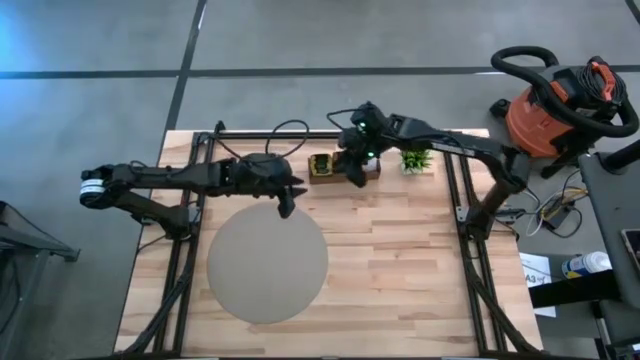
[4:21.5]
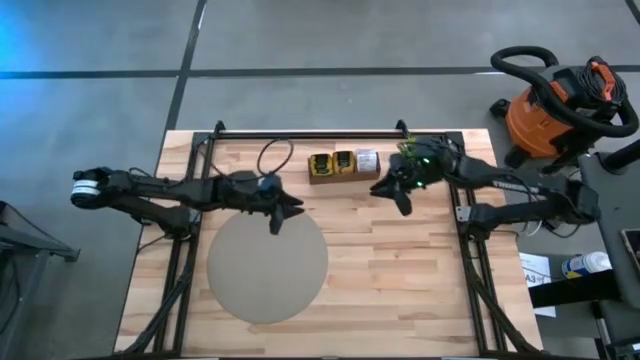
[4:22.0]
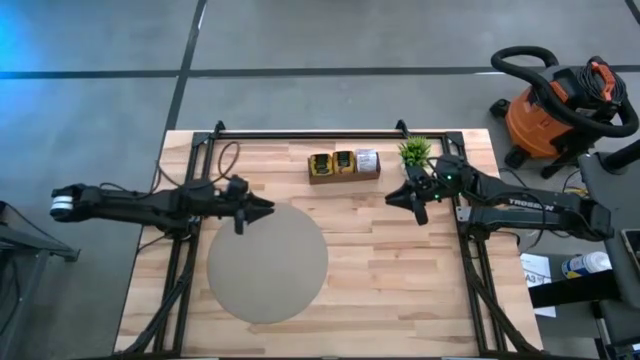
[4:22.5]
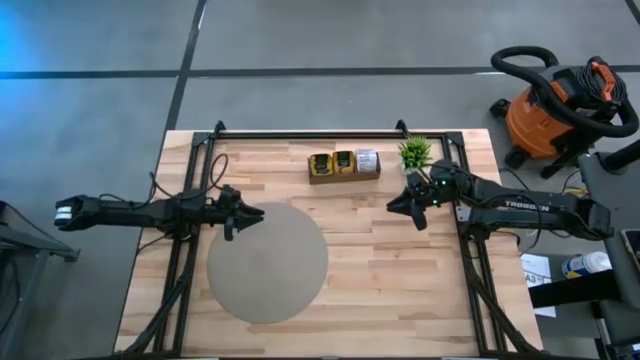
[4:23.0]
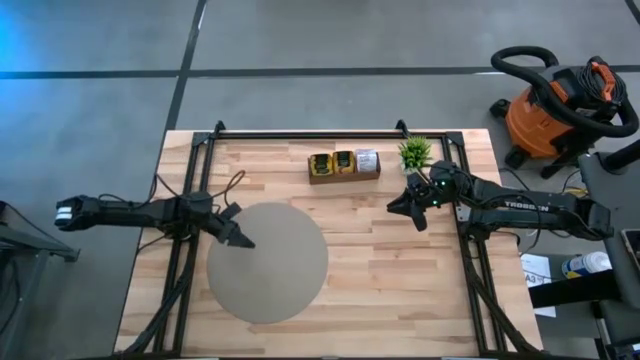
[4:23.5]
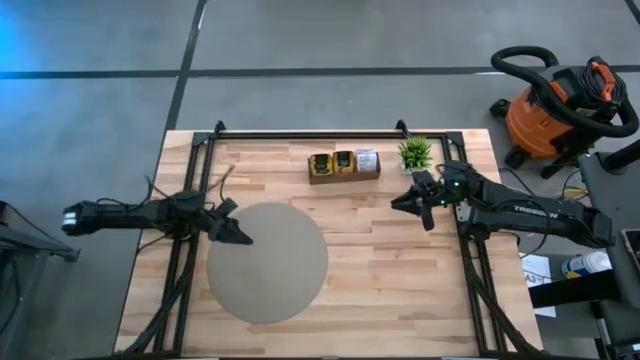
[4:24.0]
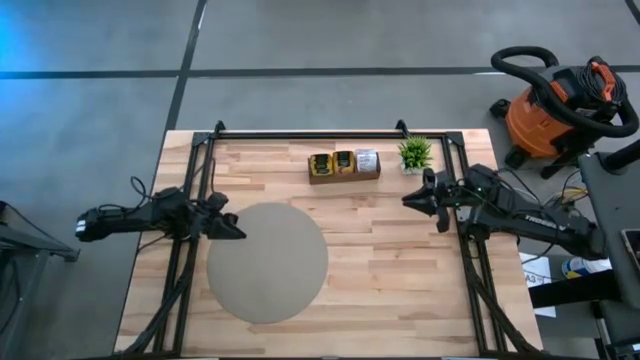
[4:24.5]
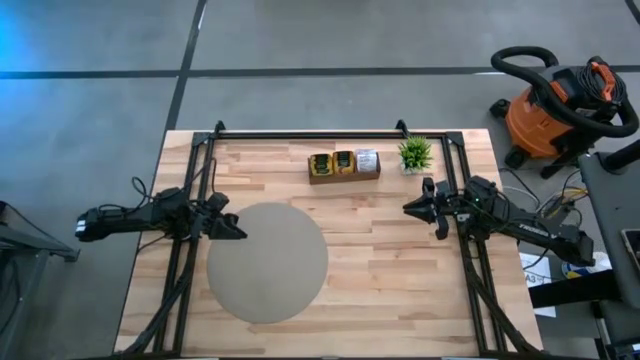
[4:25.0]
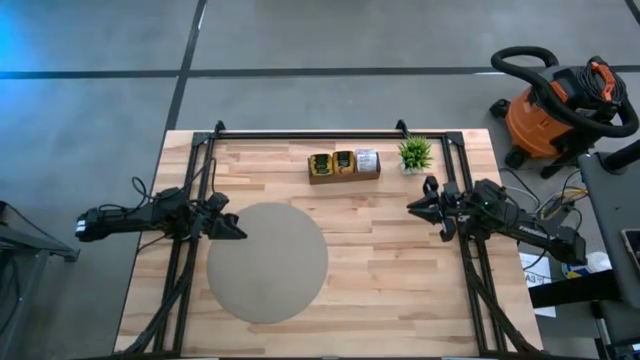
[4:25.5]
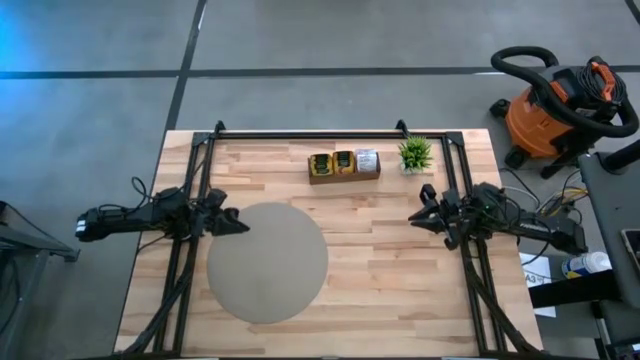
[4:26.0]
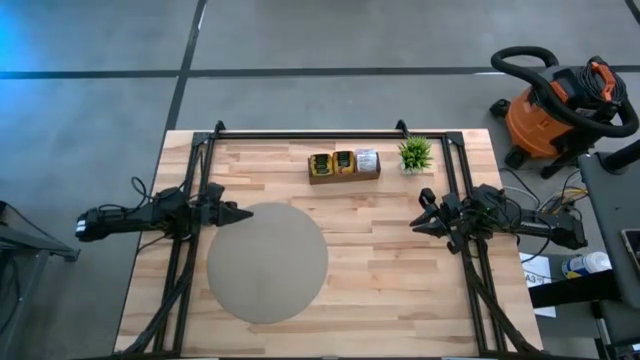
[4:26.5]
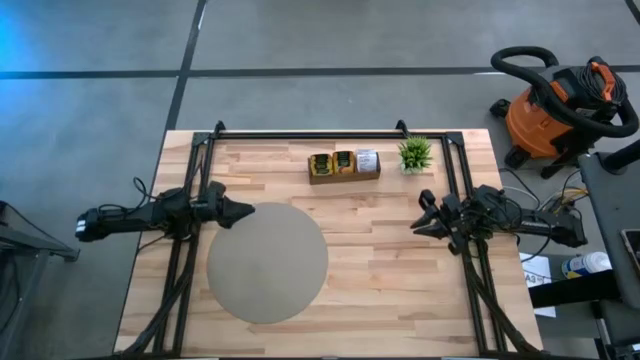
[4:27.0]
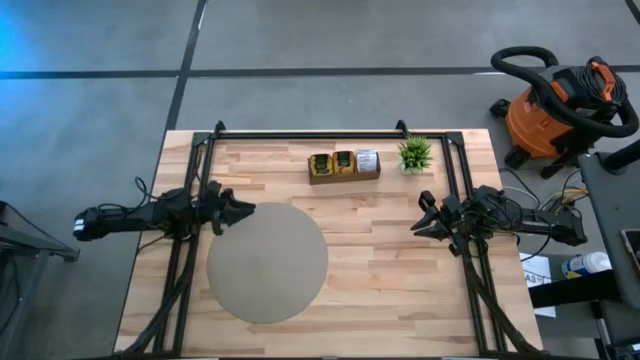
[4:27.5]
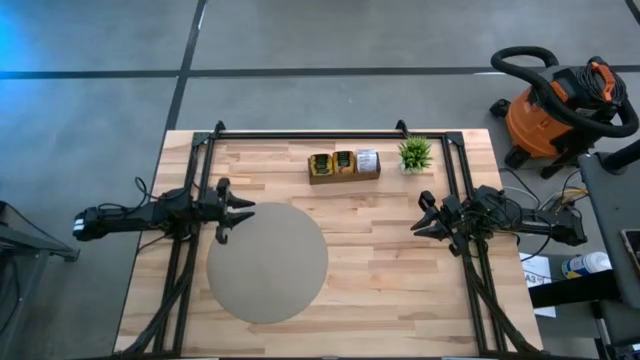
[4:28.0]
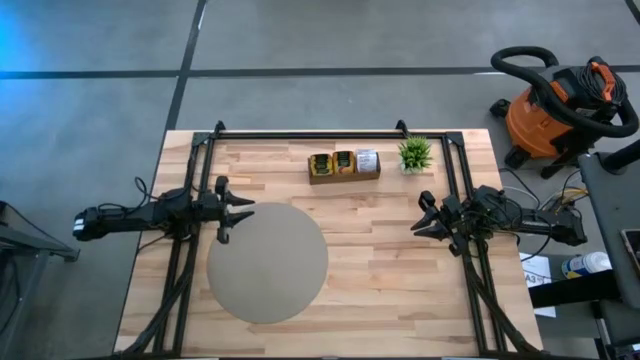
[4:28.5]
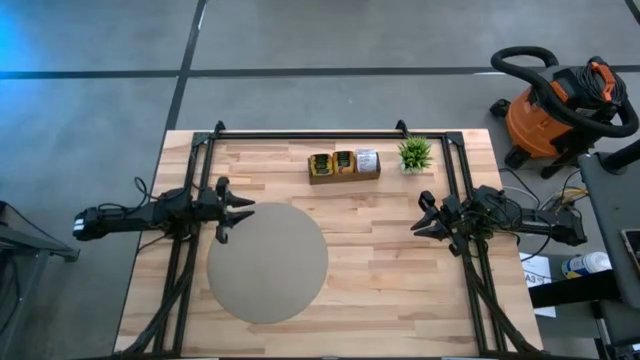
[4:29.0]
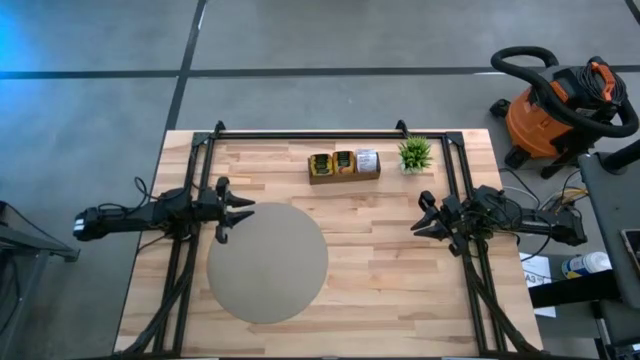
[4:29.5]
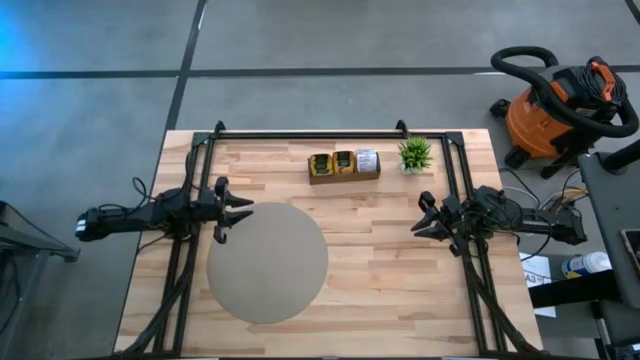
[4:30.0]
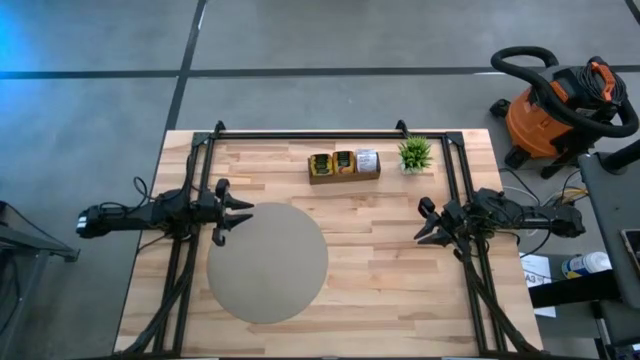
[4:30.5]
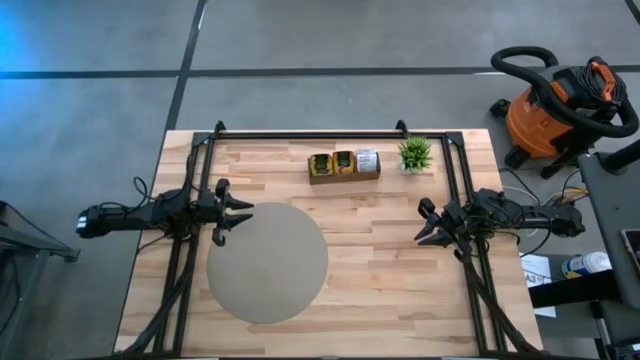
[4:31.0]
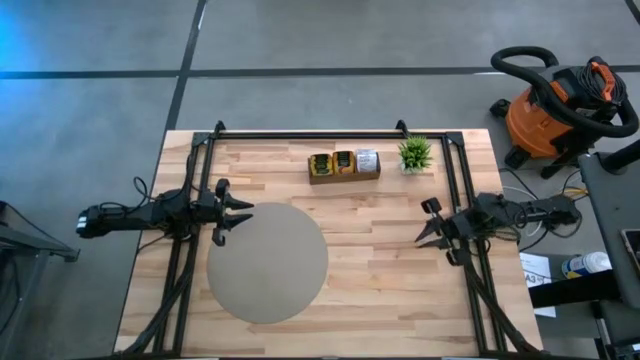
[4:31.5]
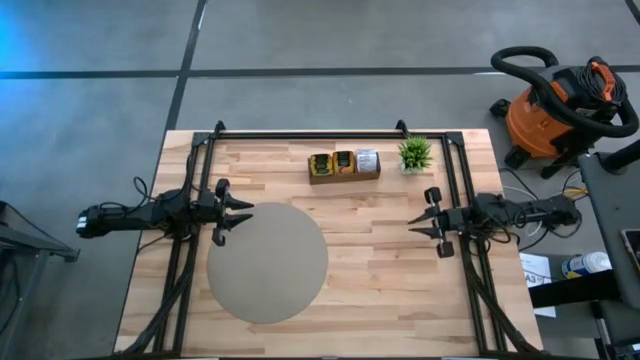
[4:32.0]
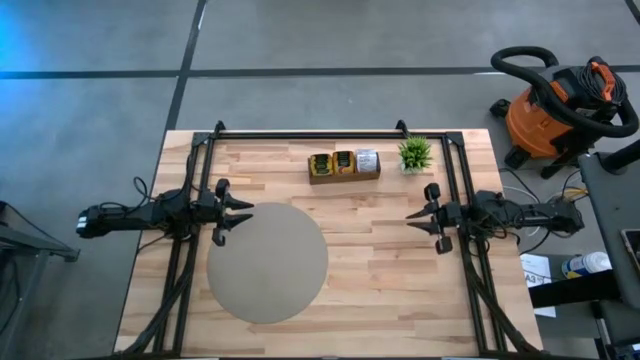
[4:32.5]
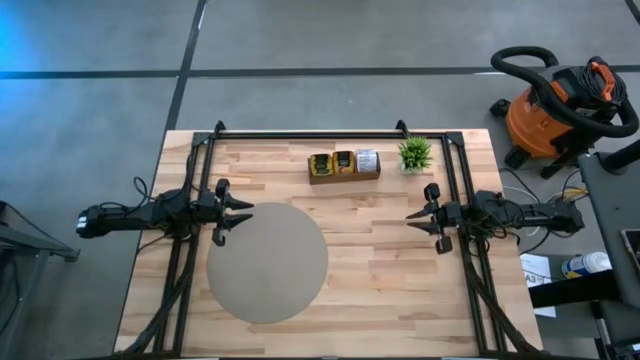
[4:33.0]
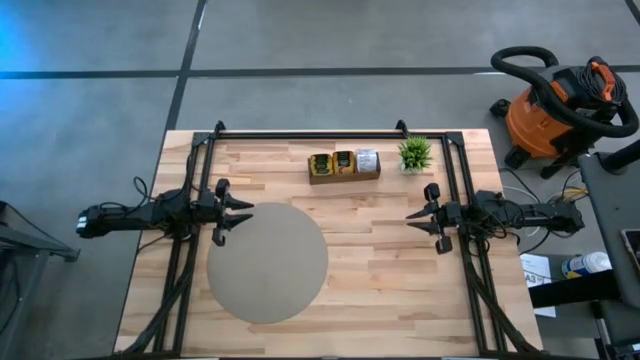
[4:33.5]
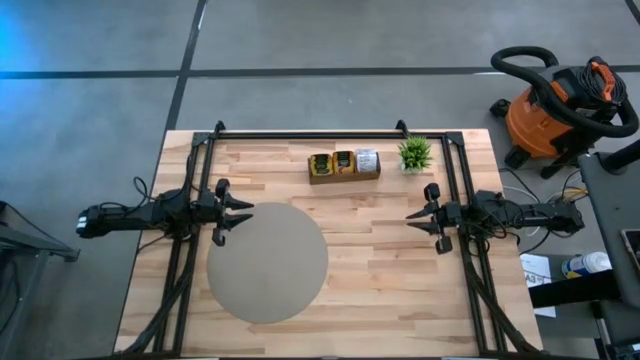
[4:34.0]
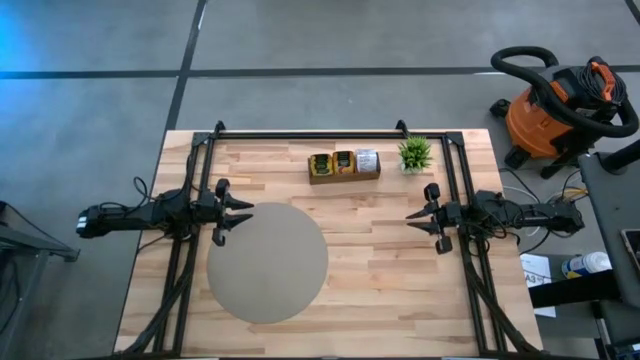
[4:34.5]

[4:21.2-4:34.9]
Task: Pick & Place Tea
Return to Home Position

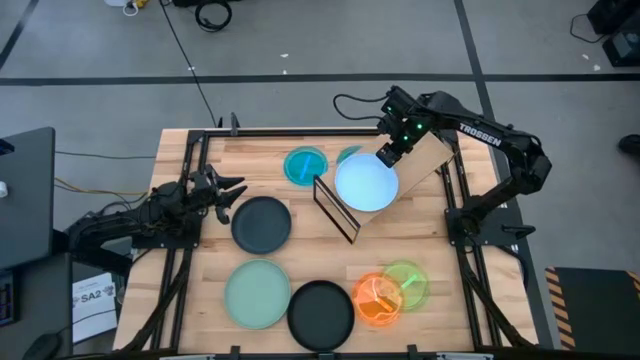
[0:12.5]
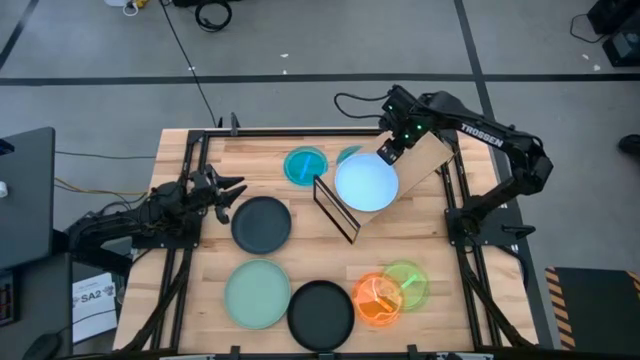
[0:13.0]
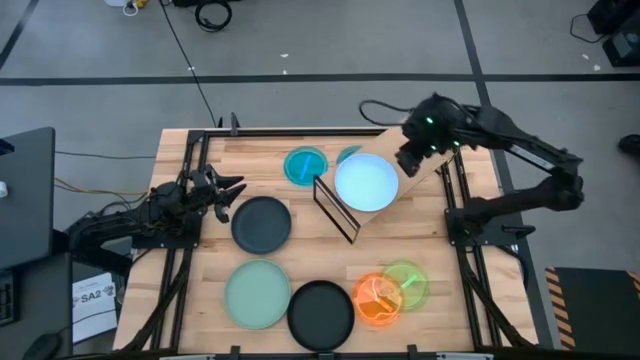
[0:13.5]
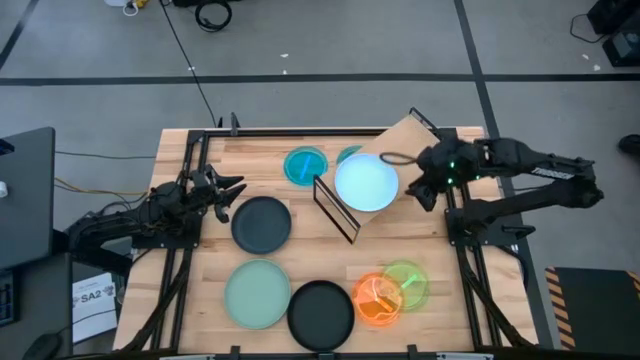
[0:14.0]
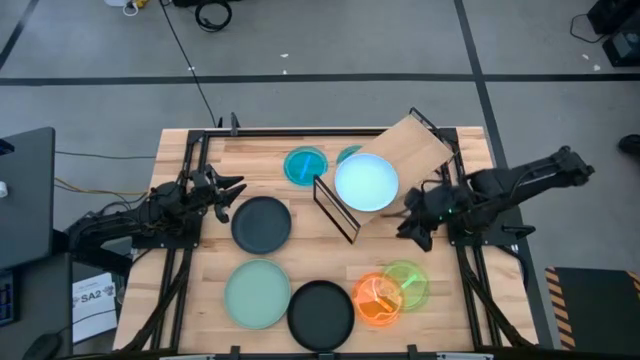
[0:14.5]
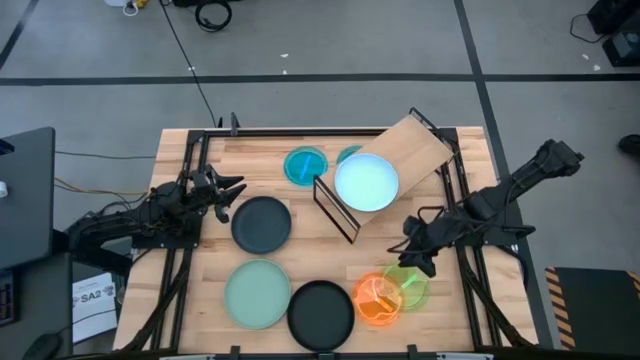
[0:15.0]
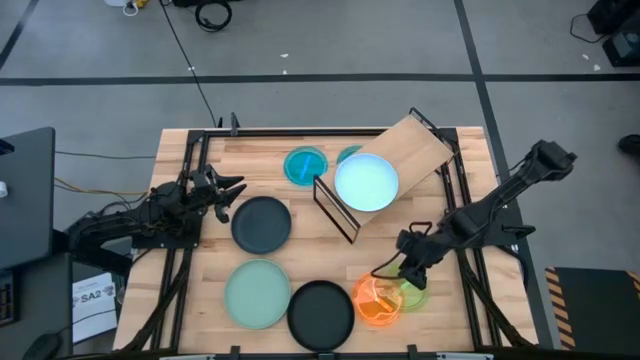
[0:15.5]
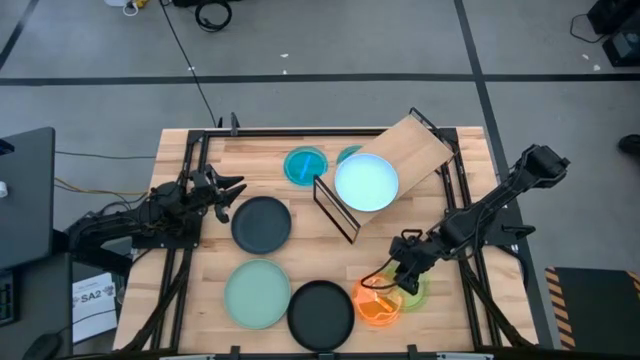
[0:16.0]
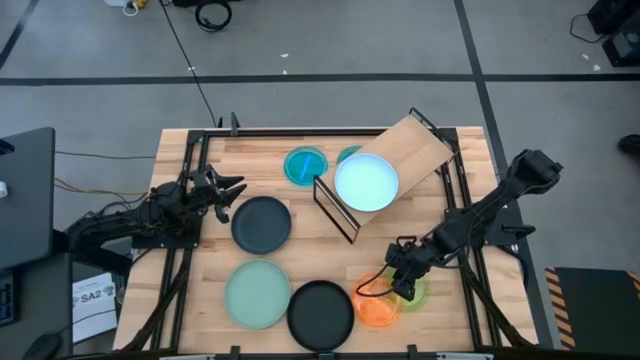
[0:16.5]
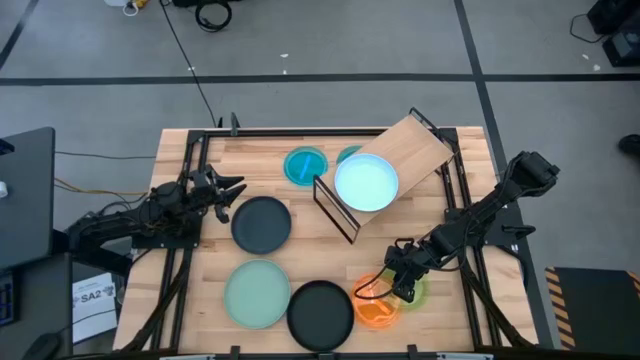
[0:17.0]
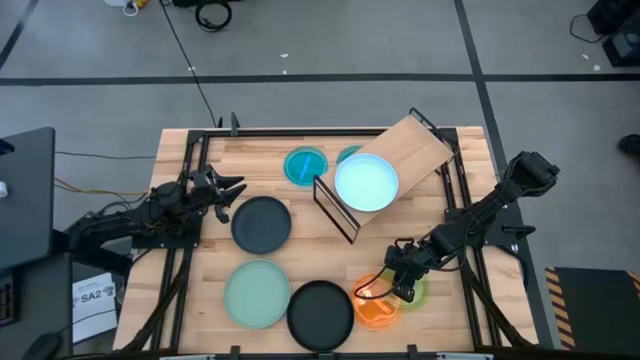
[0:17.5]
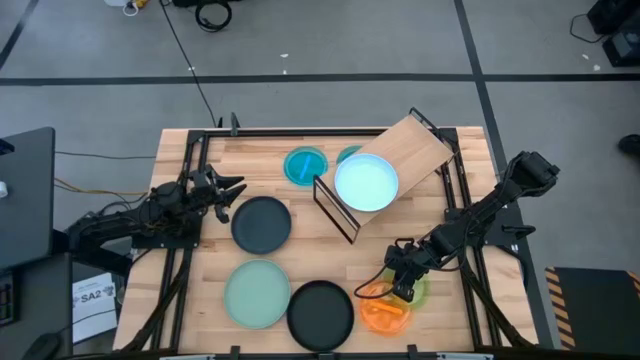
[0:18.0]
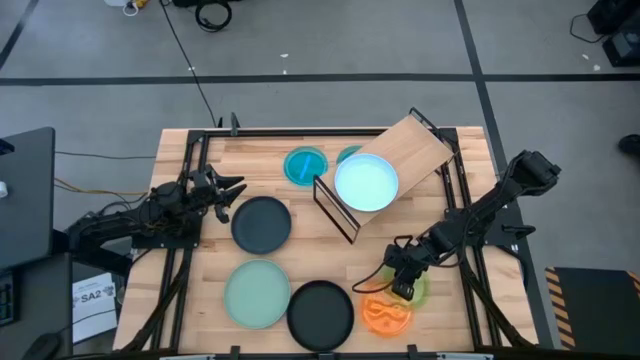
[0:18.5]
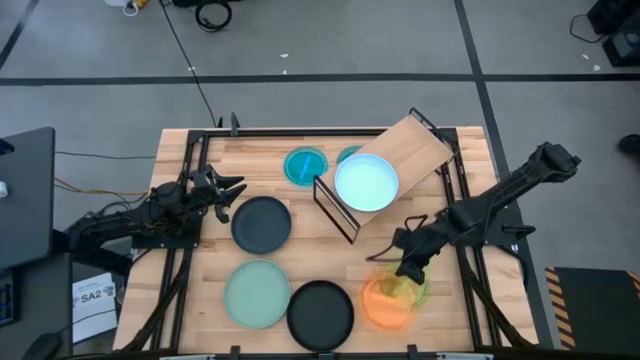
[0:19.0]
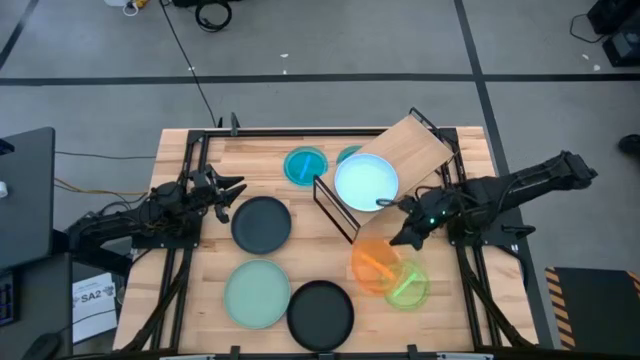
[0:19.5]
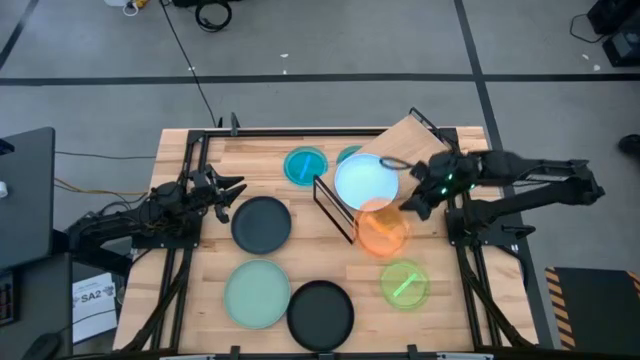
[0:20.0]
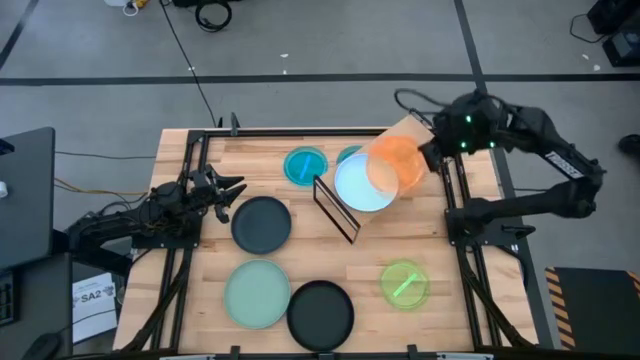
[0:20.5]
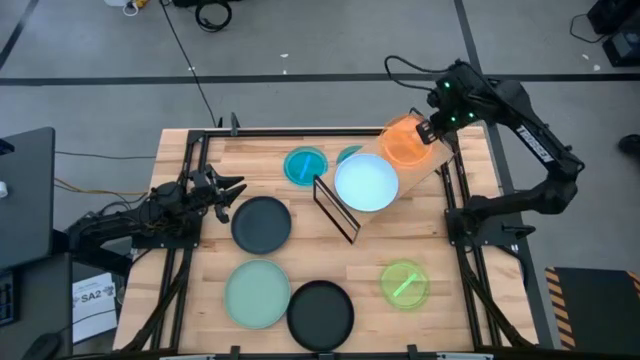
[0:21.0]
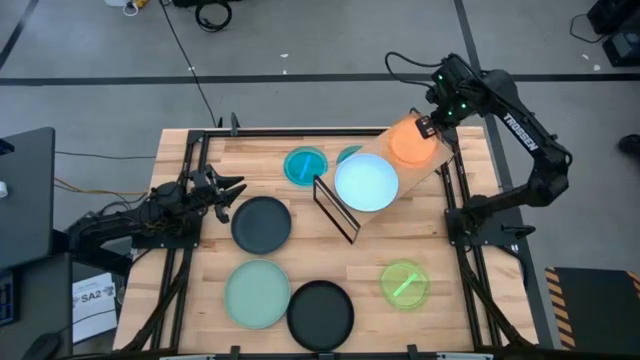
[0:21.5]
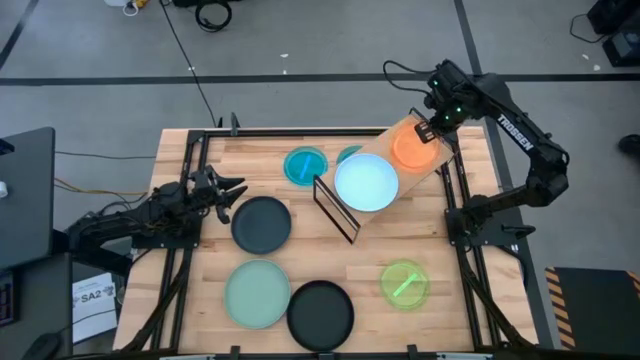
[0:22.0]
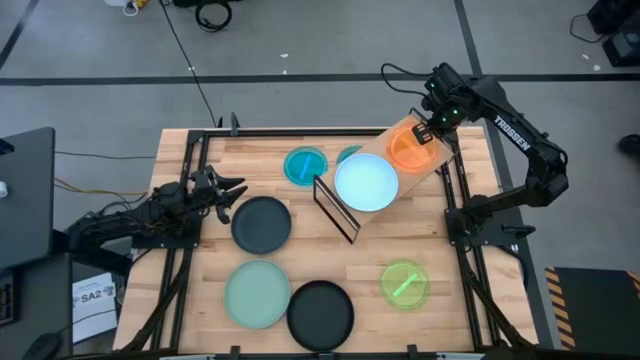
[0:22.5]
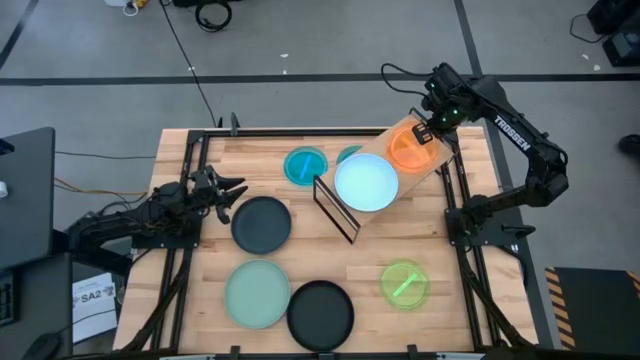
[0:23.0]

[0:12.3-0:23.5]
Task: Place and stack plates onto a shelf
Put the small orange plate on the shelf
